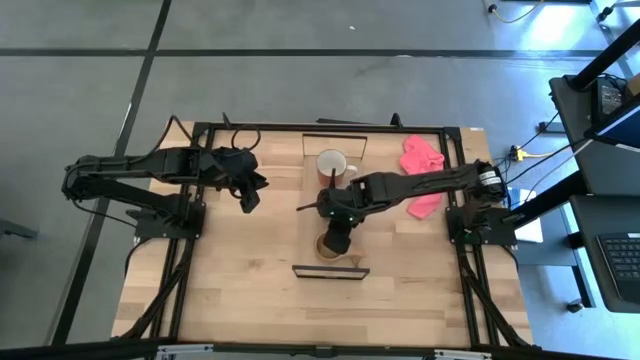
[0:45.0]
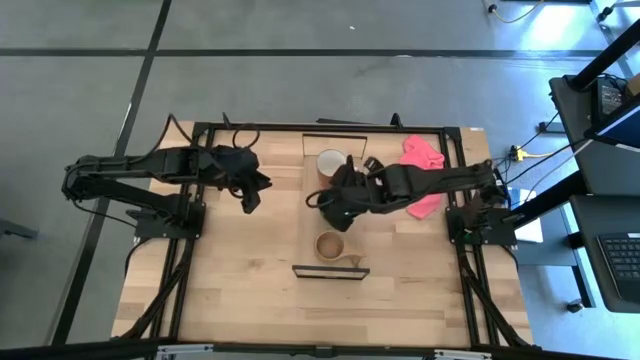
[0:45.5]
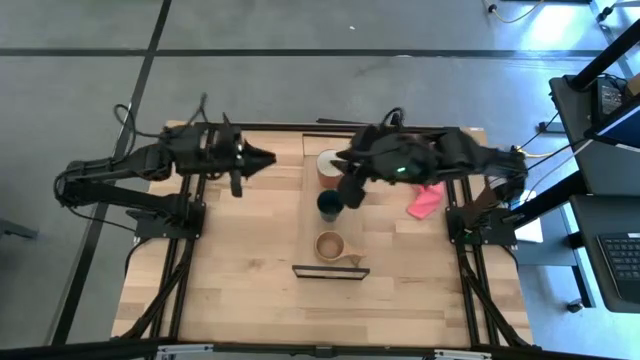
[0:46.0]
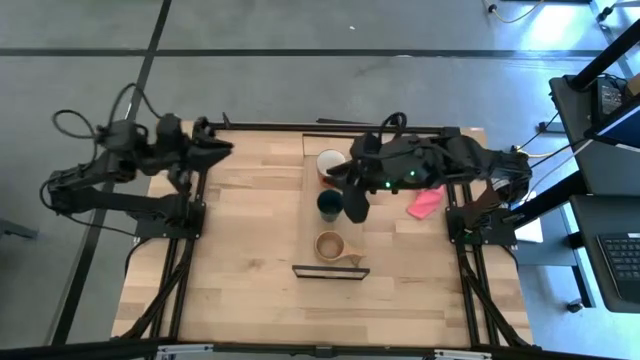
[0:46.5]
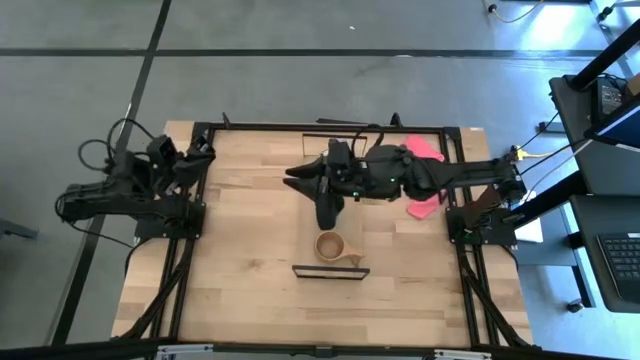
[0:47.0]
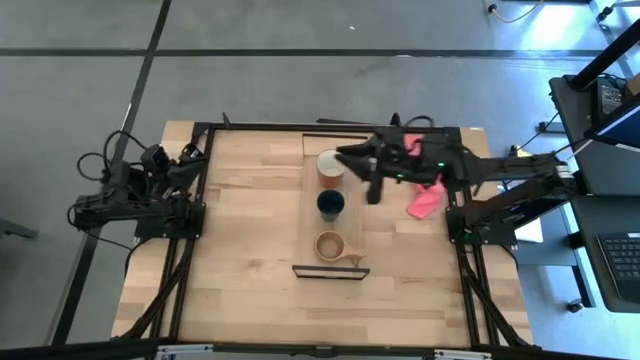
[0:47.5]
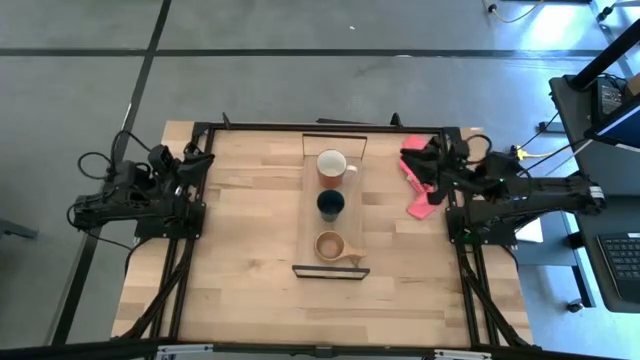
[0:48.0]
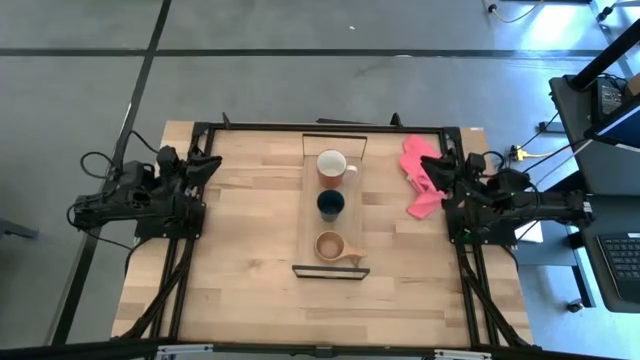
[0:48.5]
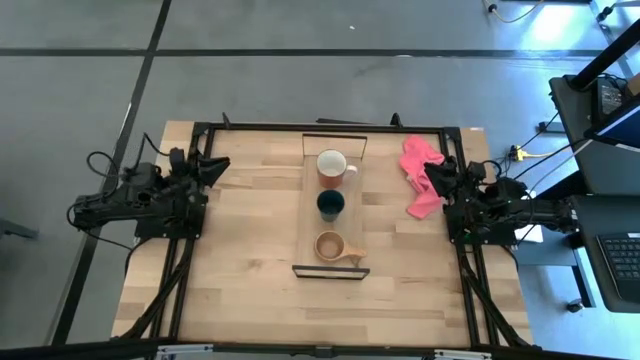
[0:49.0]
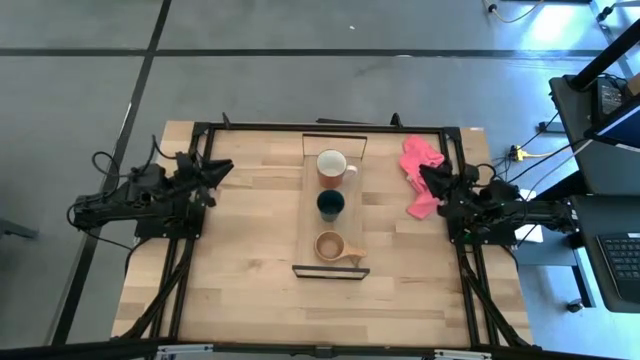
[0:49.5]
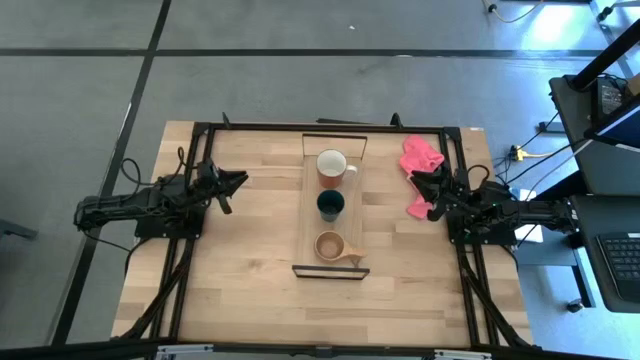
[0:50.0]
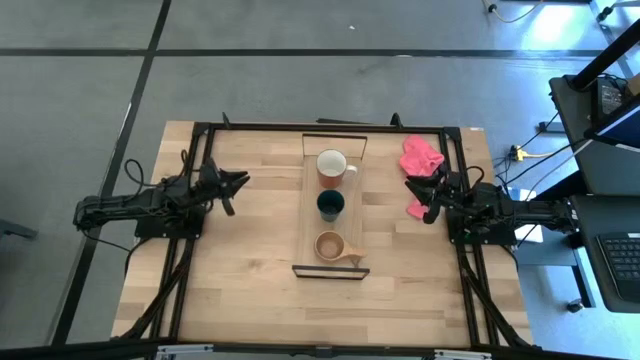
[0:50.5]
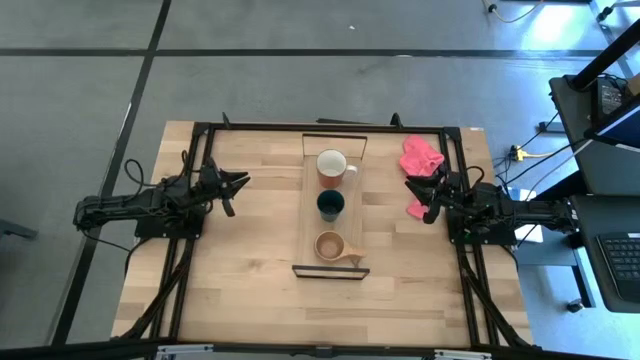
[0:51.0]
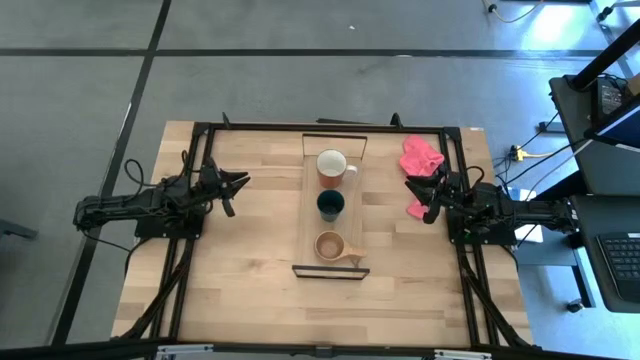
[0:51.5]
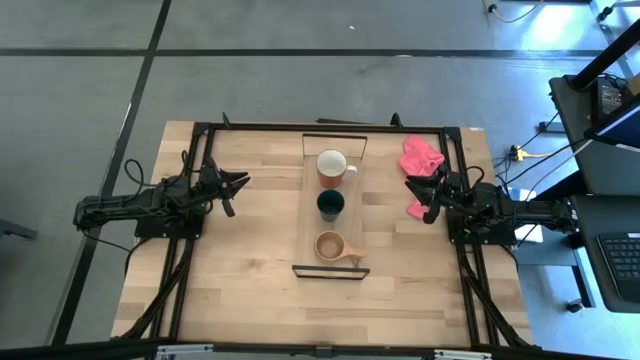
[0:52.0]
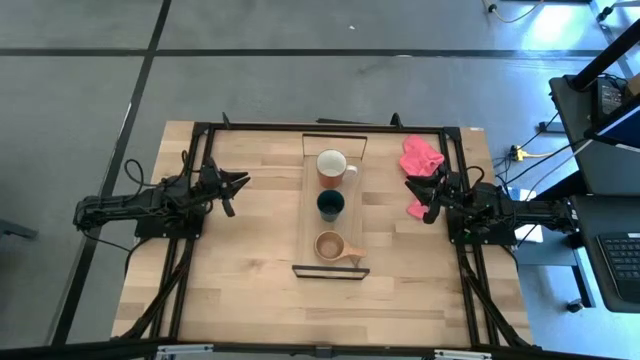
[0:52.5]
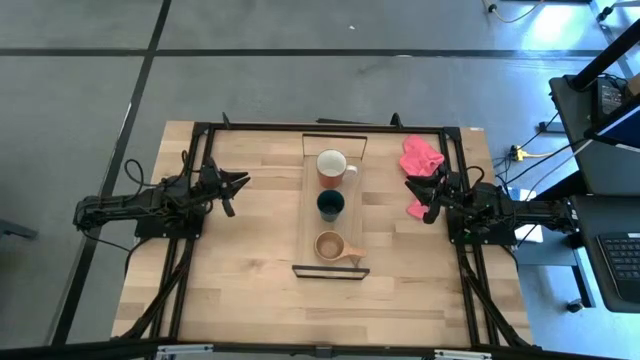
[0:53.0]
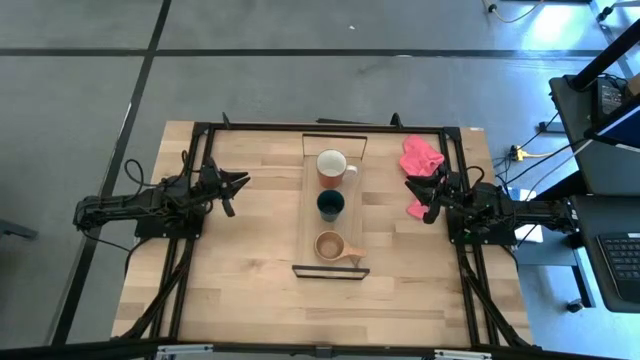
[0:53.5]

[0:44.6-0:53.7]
Task: Stack small to large cups/mugs on shelf
Return to Home Position

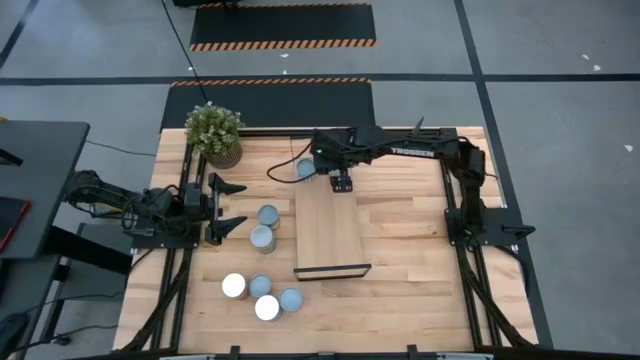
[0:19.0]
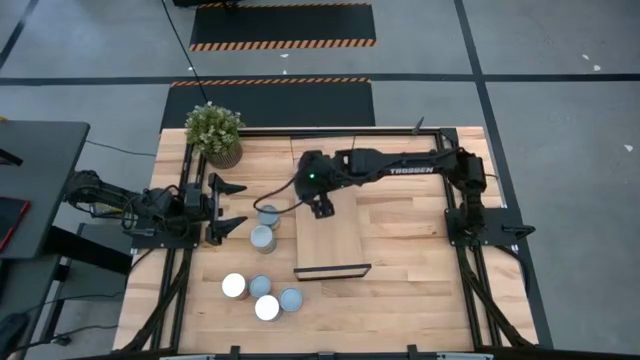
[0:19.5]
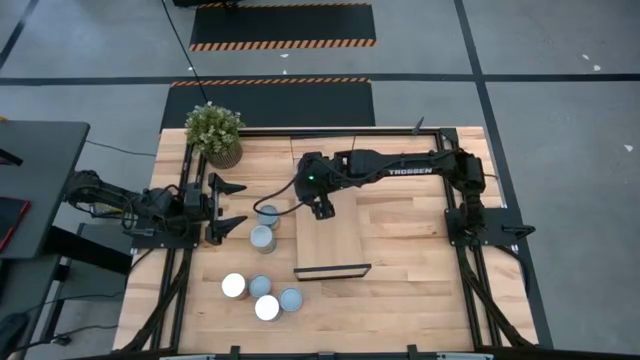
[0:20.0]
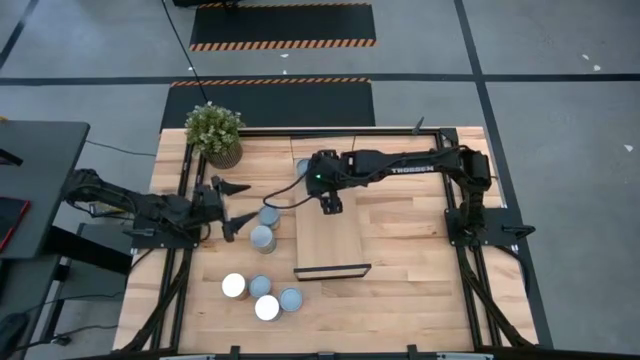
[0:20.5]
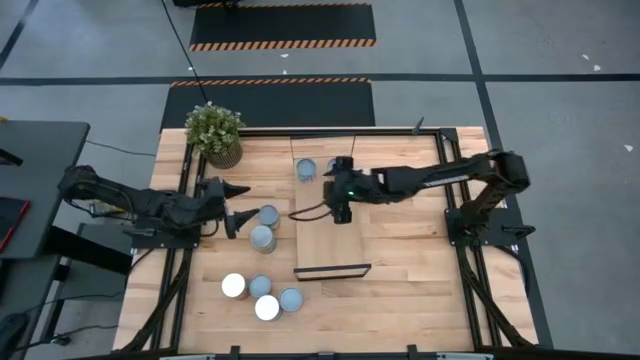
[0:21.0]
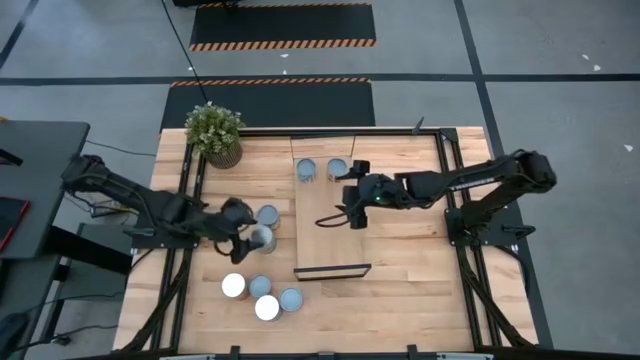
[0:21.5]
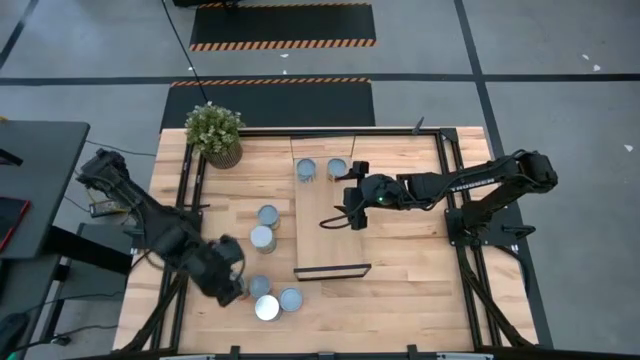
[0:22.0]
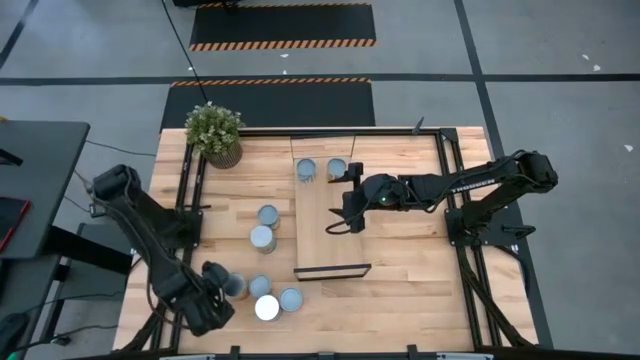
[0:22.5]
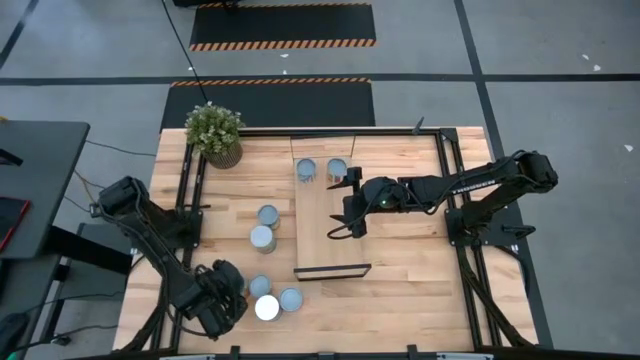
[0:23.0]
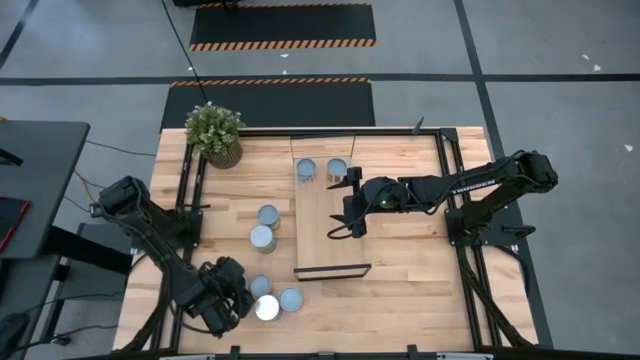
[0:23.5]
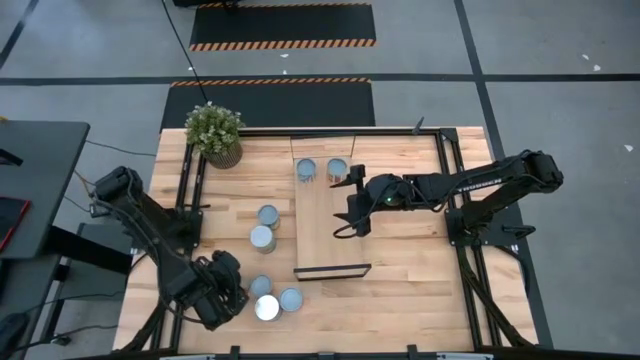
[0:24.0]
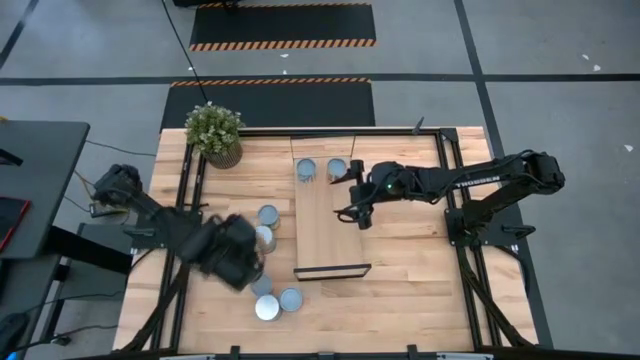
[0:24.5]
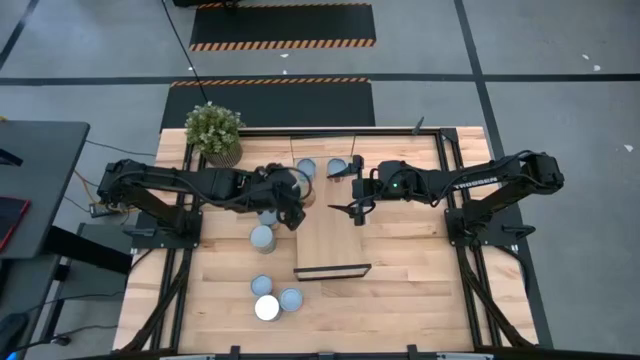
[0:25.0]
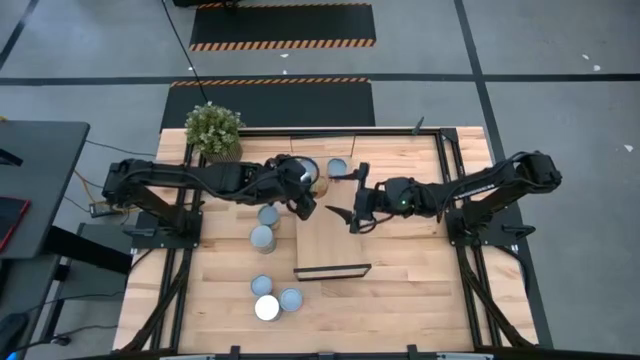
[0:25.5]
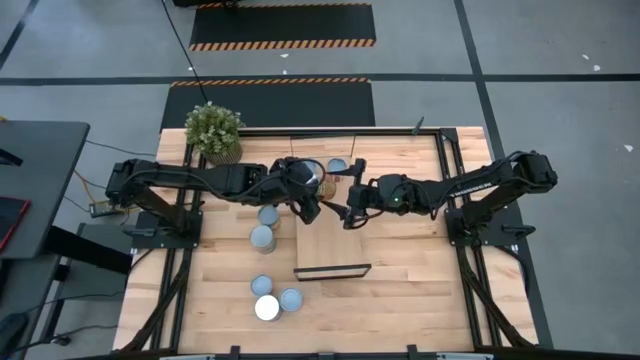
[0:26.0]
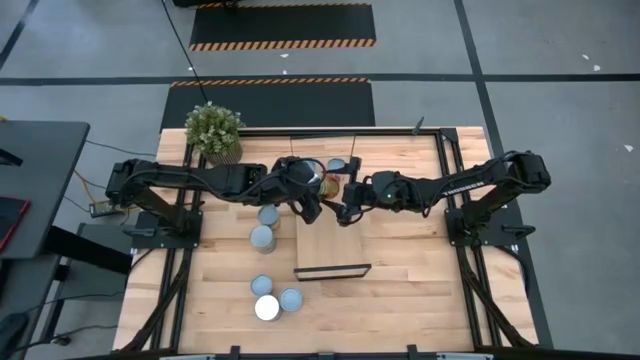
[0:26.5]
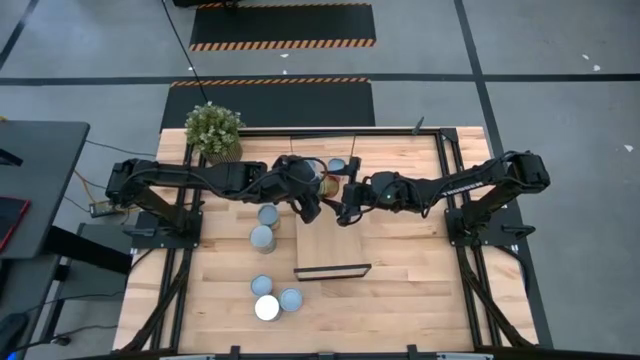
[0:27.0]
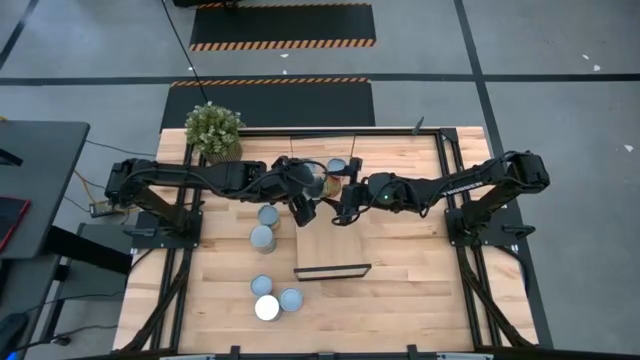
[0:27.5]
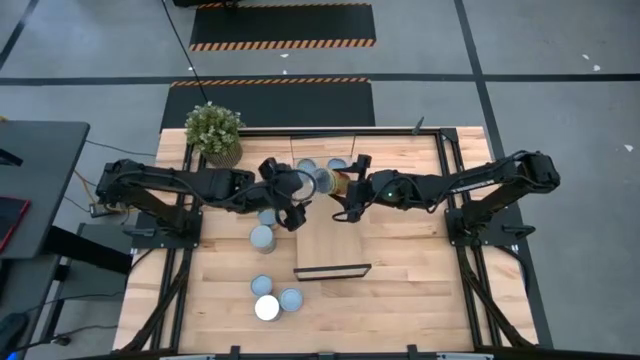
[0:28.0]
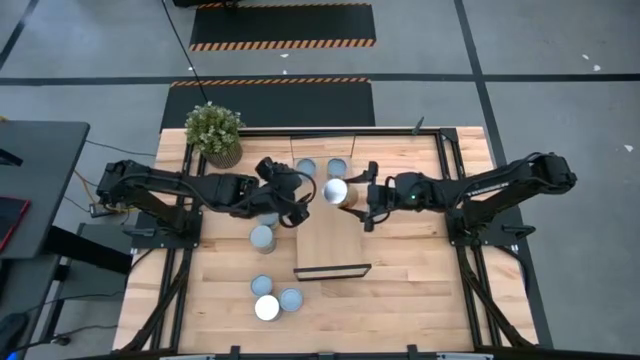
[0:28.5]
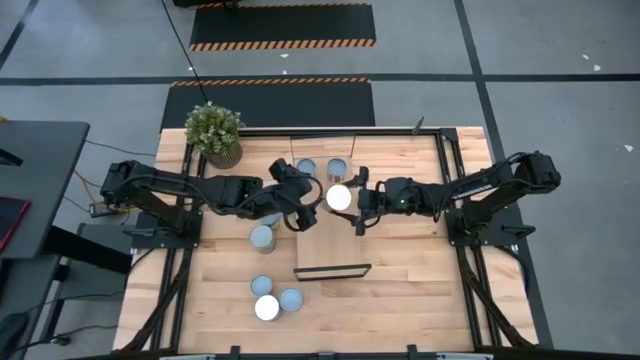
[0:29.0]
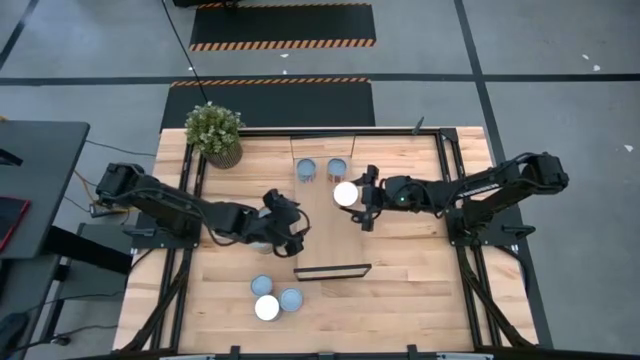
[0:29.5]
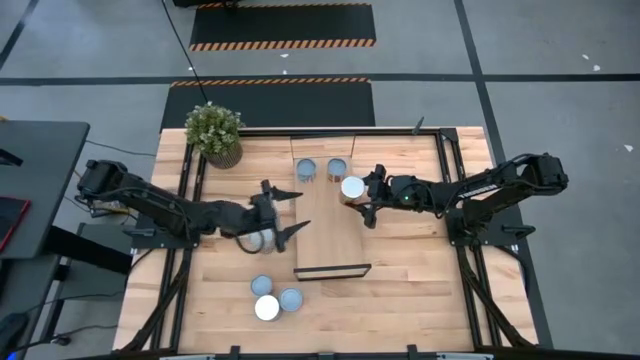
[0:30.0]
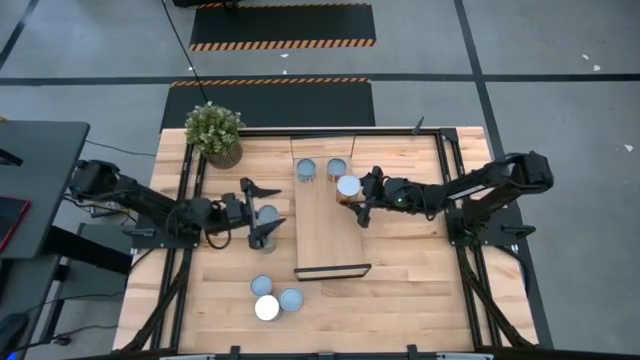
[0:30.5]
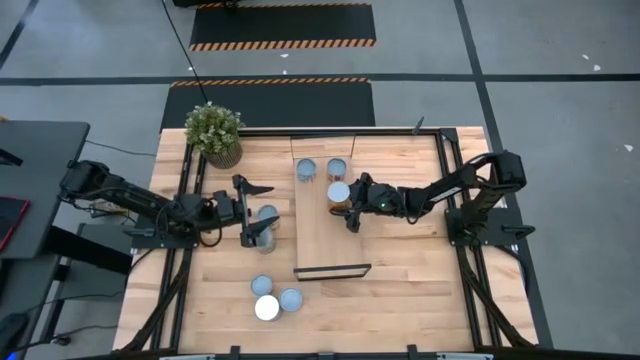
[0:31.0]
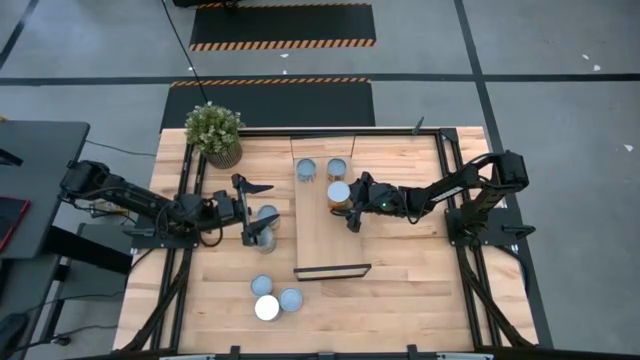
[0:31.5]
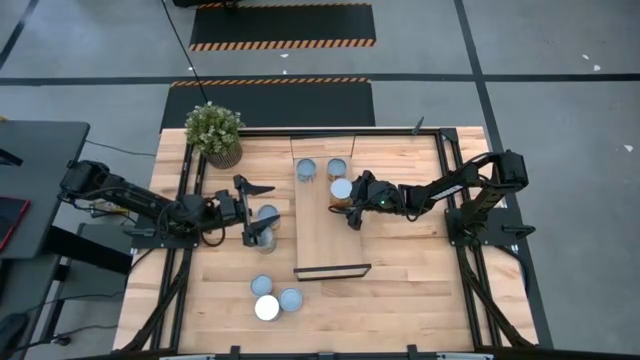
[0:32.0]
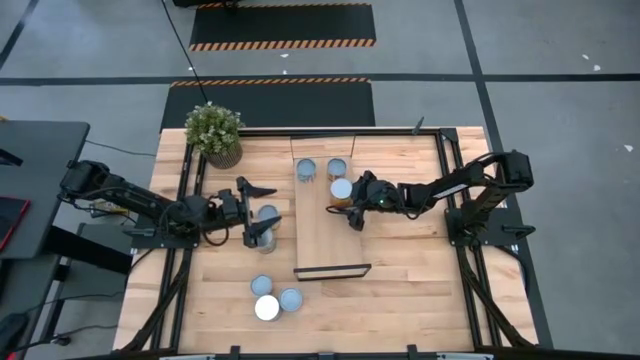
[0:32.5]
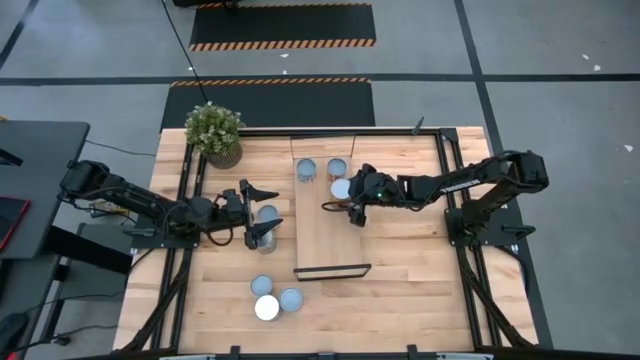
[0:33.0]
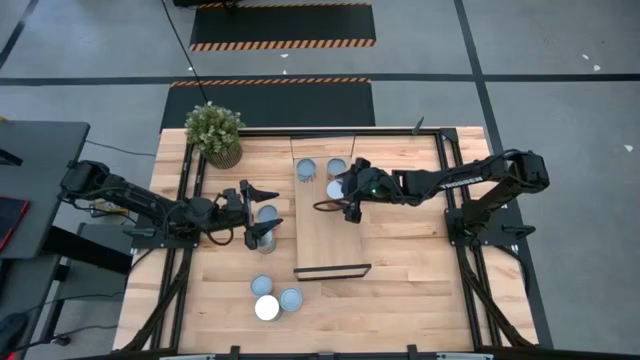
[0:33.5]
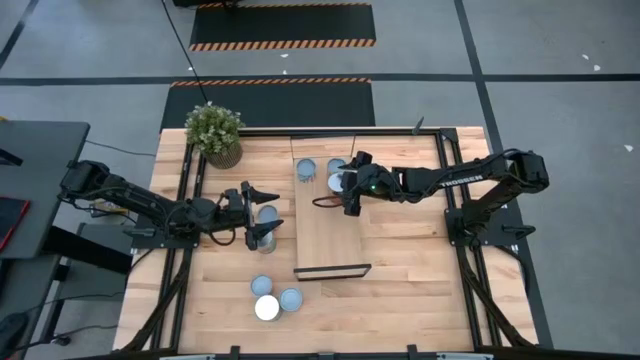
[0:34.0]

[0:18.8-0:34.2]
Task: Pick and place cans onto a shelf
Put the canned pineapple on the shelf
